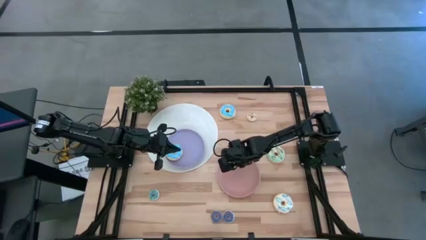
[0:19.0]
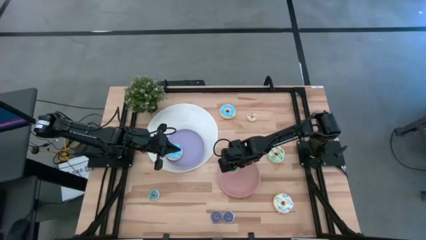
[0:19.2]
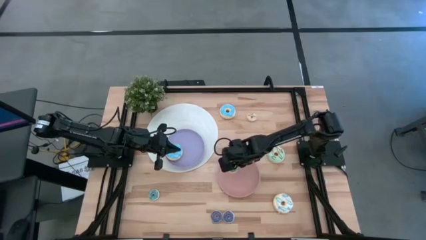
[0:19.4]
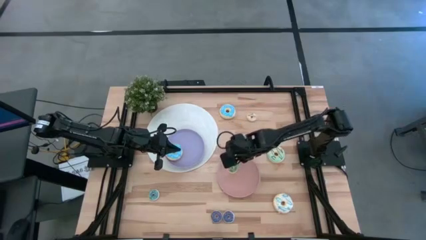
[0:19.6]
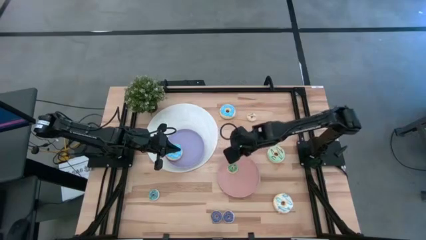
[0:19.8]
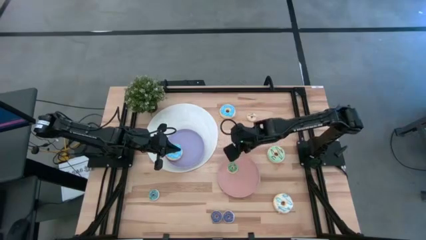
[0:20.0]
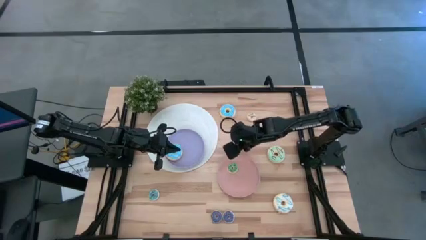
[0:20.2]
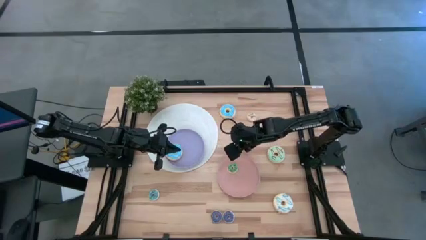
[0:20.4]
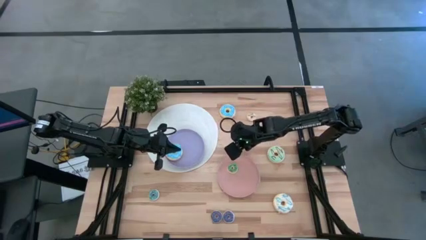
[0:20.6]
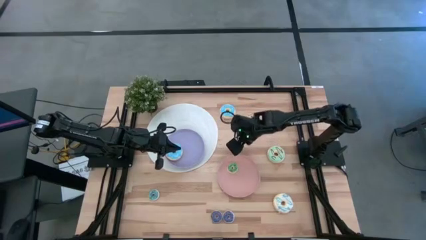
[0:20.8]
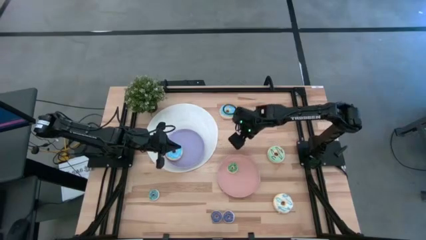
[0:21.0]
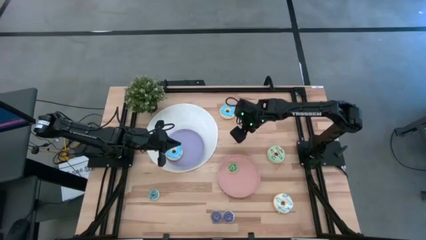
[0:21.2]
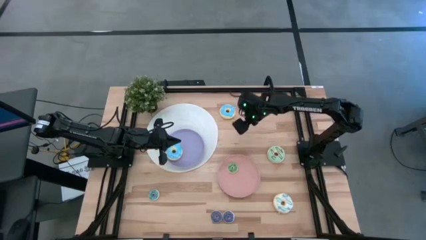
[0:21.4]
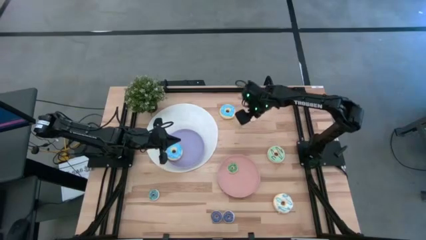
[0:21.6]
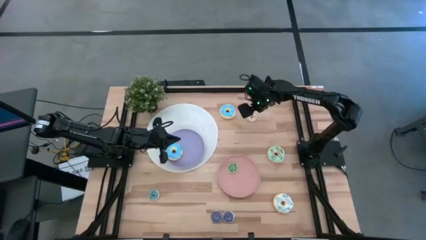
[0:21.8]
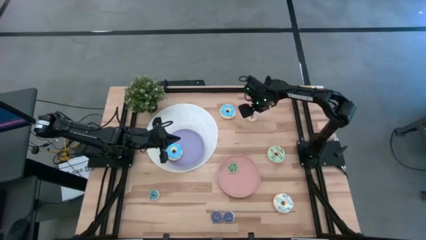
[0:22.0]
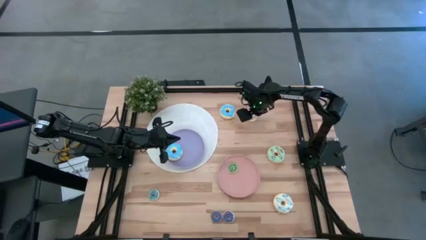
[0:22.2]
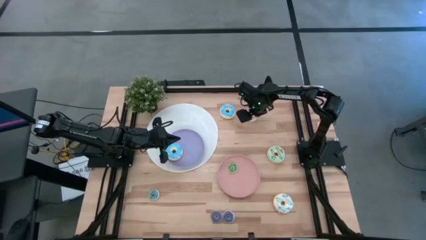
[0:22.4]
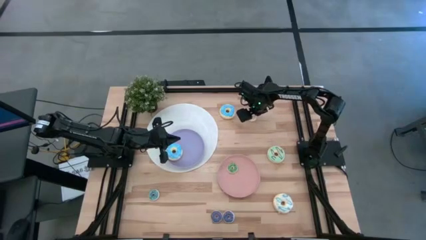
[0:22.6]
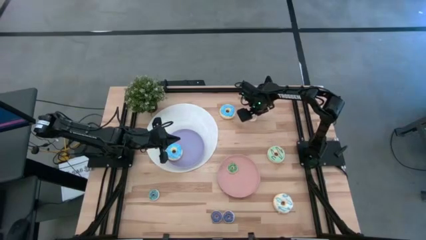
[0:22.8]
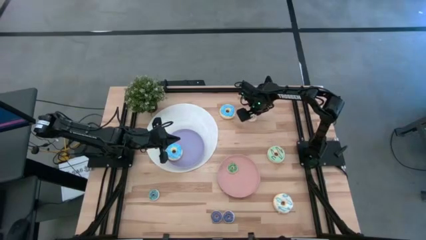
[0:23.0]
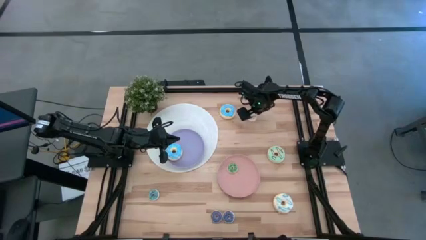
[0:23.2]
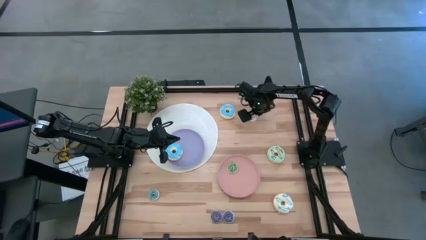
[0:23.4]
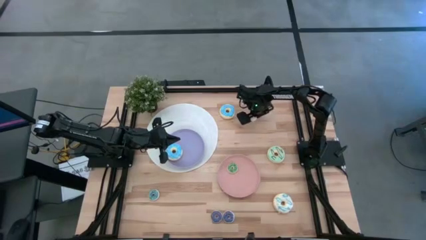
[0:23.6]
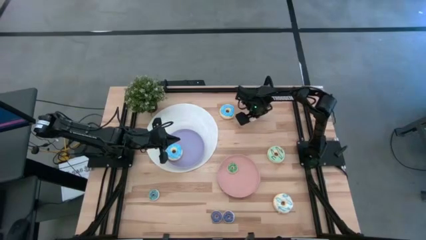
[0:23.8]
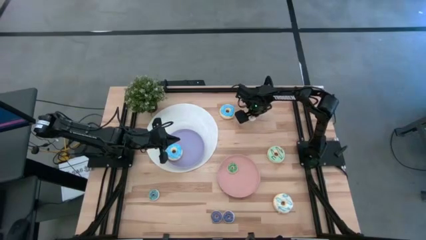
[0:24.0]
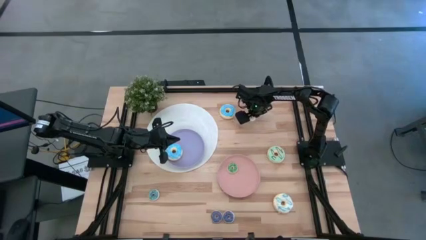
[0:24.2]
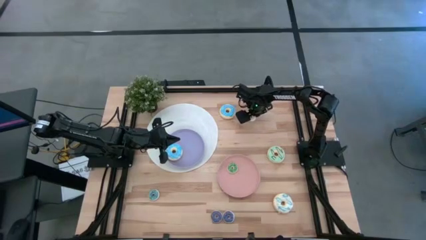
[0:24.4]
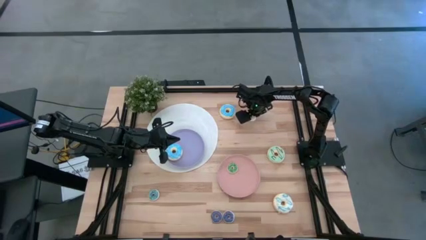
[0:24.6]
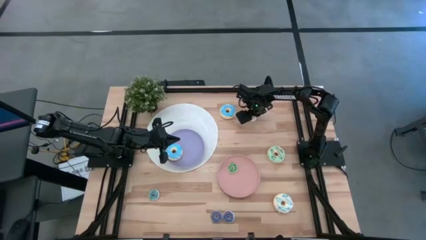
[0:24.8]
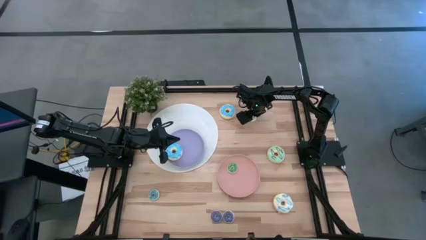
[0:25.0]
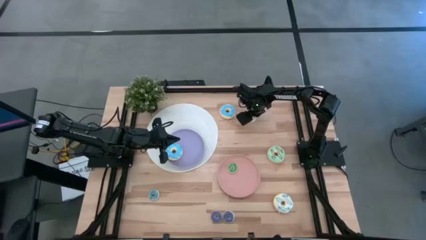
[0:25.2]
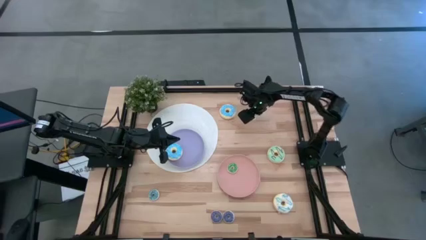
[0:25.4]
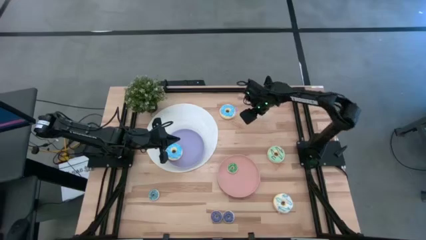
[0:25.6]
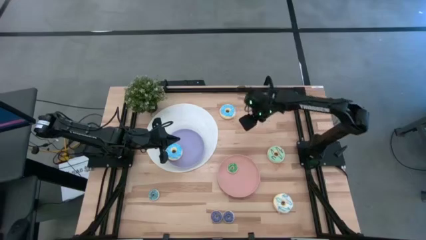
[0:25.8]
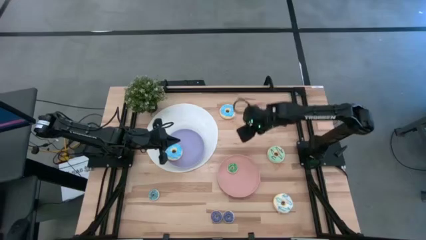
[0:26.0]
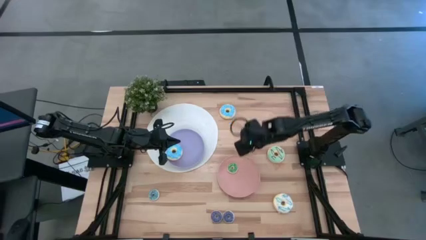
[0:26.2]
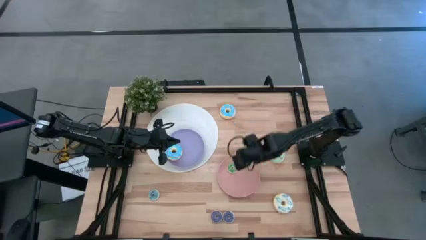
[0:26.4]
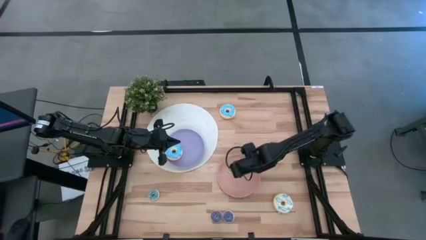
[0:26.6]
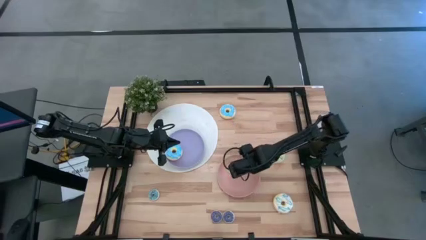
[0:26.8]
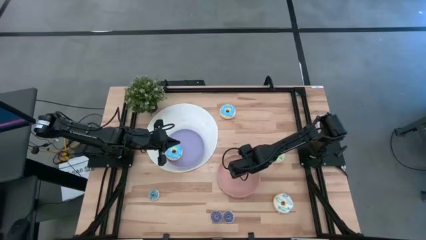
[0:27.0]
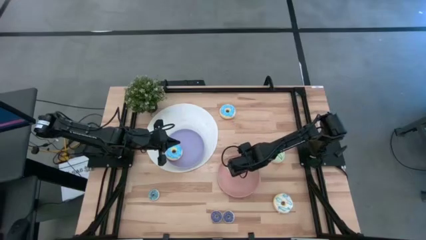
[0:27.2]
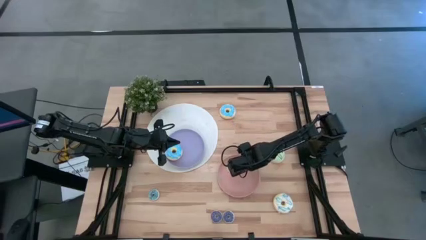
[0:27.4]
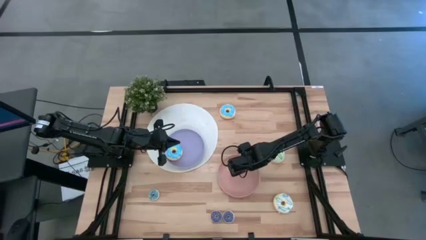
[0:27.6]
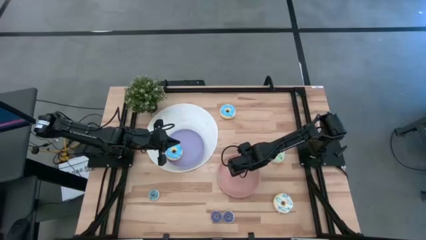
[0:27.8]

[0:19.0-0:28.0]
Task: Pick & Place donuts
Put the small white donut on the pink plate

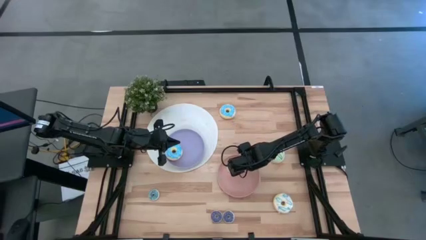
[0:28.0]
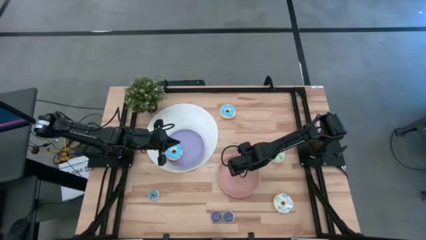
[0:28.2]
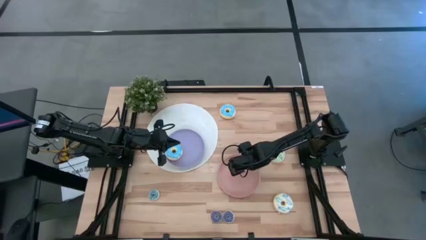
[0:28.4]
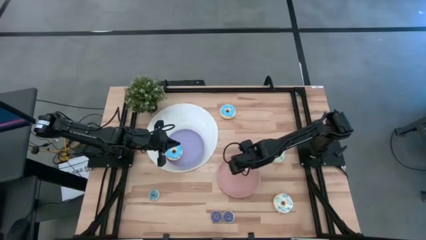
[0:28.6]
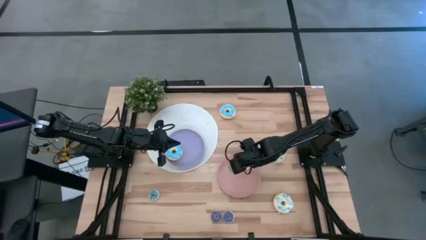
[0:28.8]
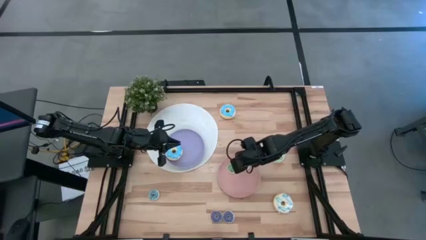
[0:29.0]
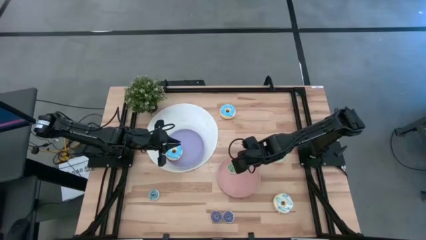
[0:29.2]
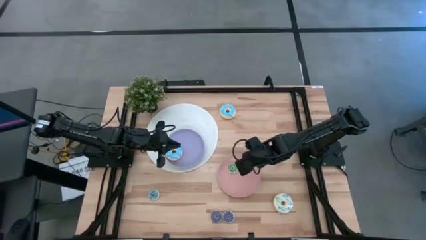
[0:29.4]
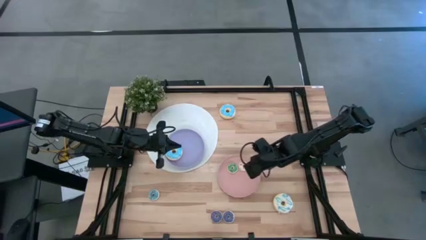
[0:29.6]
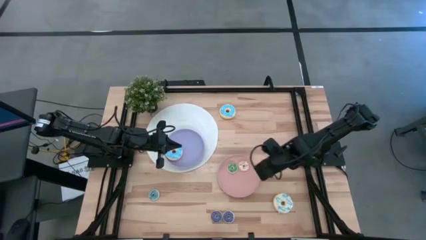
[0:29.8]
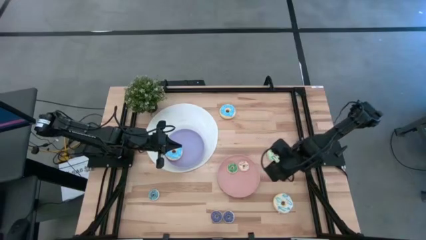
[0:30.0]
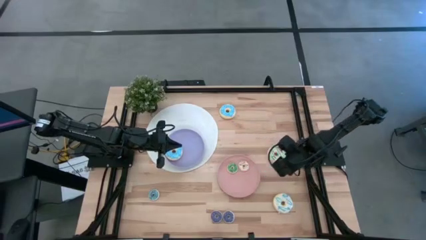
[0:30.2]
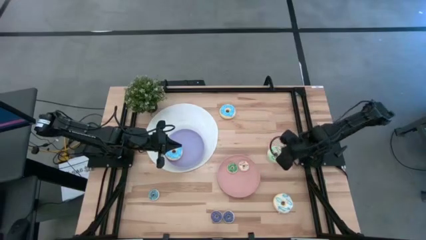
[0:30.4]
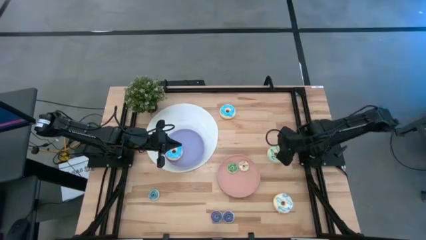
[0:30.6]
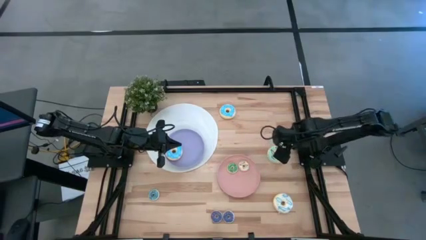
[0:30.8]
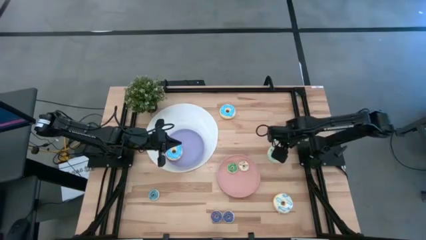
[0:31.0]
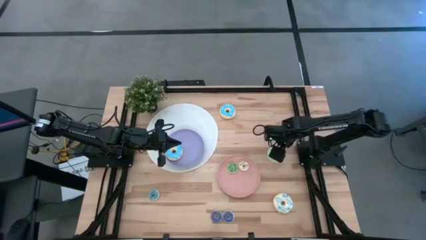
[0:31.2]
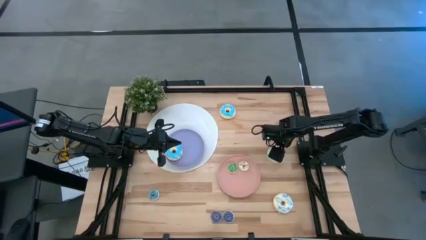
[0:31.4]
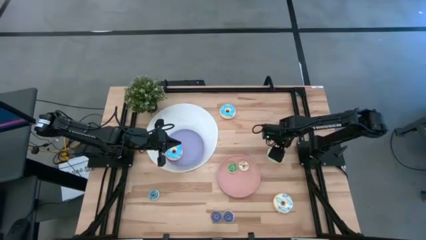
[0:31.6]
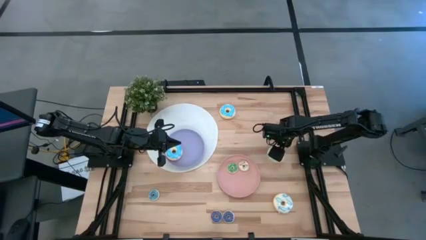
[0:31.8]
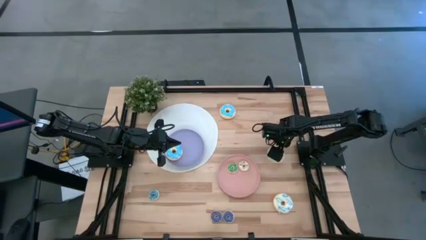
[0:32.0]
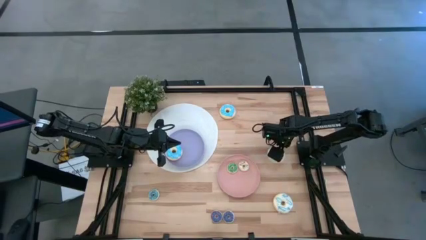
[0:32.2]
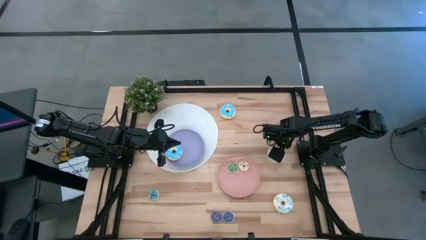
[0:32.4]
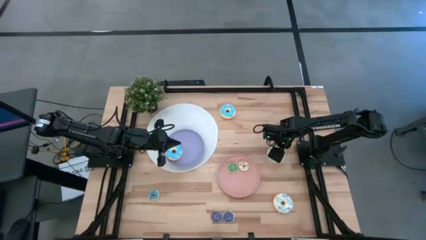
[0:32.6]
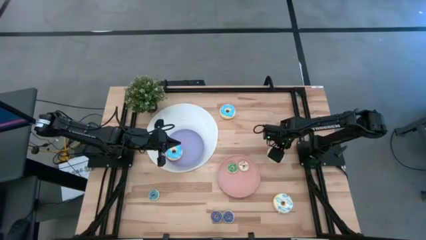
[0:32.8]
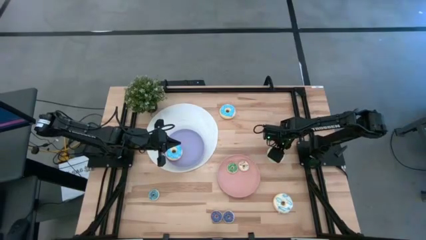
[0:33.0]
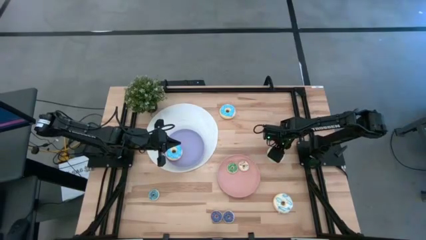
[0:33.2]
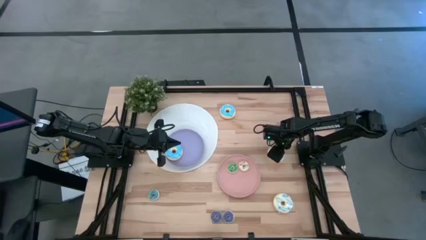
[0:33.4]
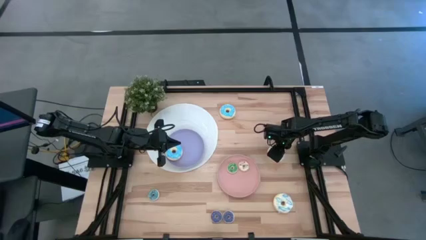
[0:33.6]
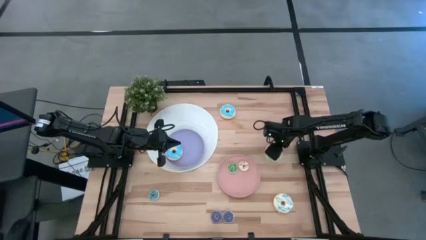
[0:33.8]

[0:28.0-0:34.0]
Put the big light green donut on the purple plate
